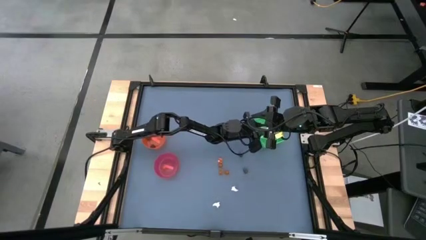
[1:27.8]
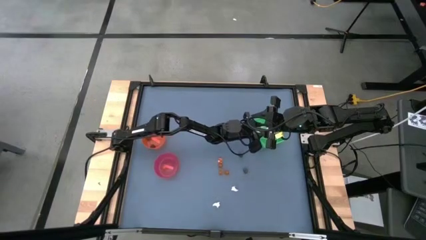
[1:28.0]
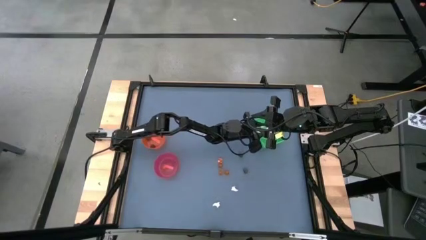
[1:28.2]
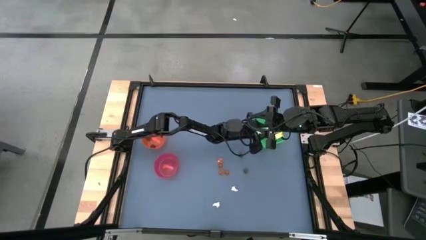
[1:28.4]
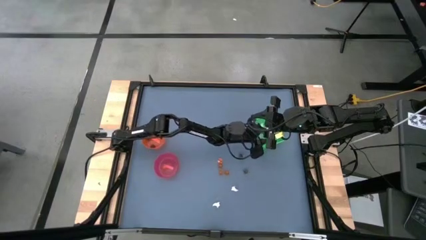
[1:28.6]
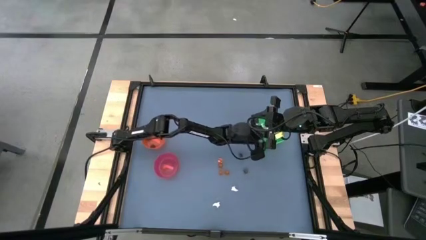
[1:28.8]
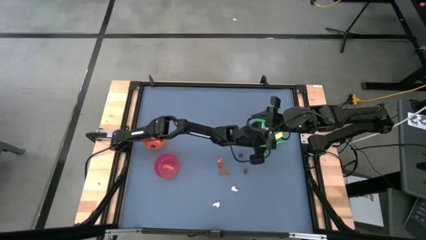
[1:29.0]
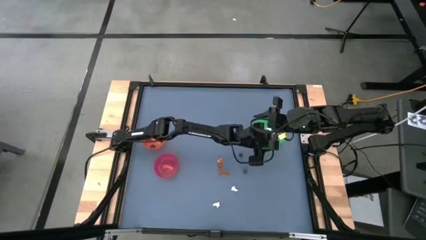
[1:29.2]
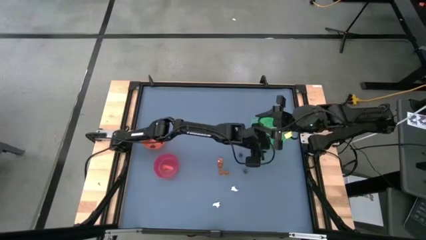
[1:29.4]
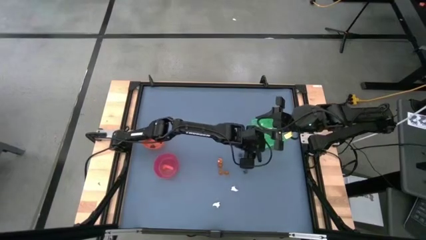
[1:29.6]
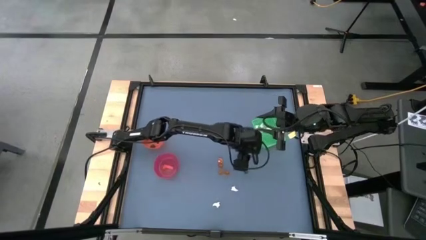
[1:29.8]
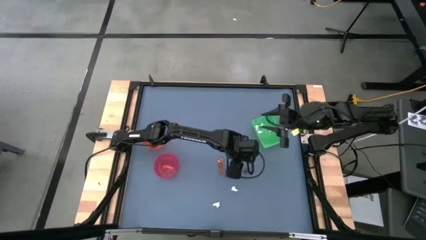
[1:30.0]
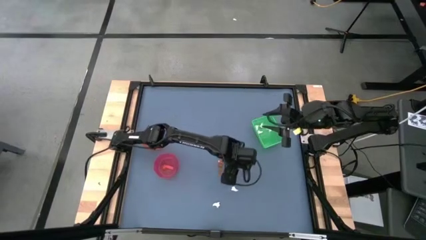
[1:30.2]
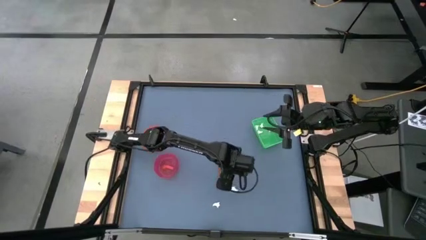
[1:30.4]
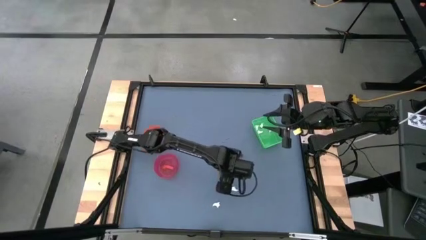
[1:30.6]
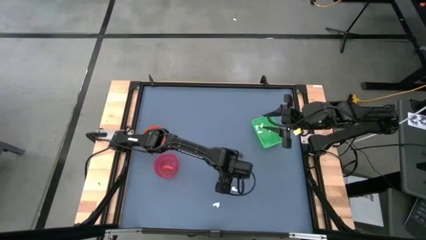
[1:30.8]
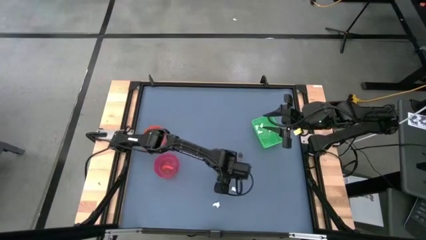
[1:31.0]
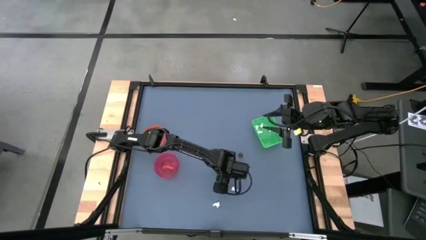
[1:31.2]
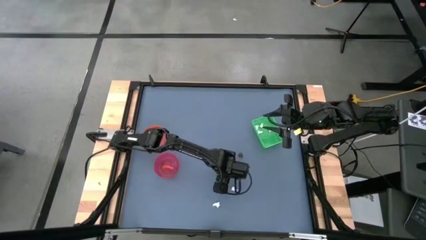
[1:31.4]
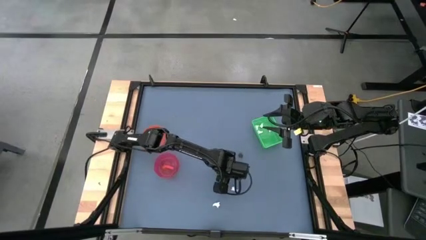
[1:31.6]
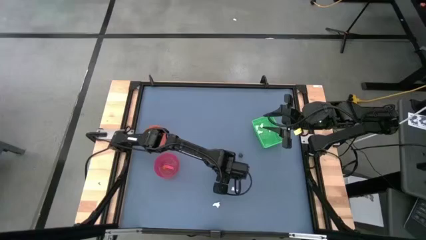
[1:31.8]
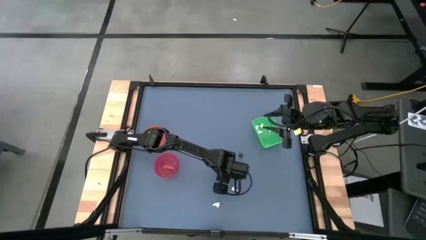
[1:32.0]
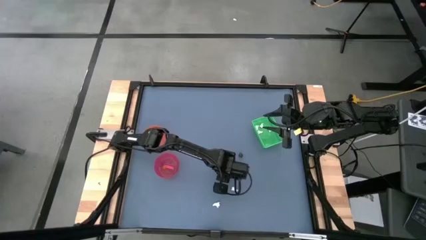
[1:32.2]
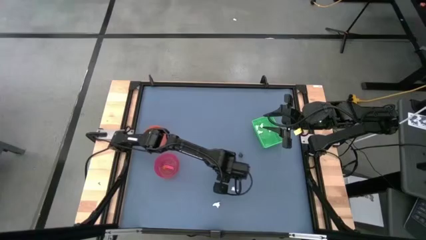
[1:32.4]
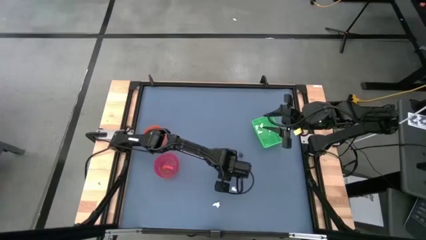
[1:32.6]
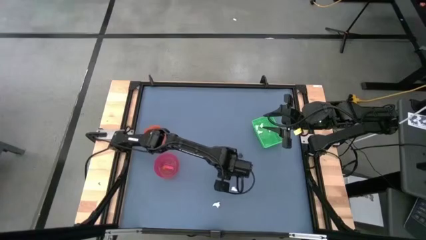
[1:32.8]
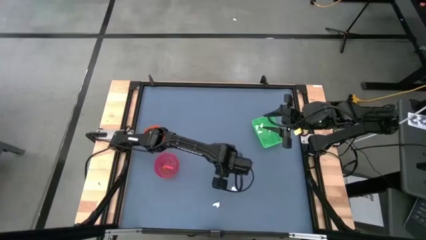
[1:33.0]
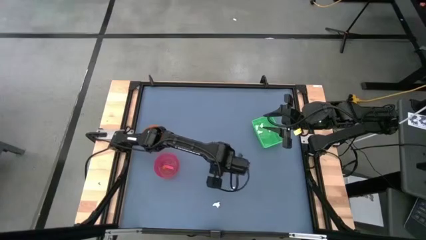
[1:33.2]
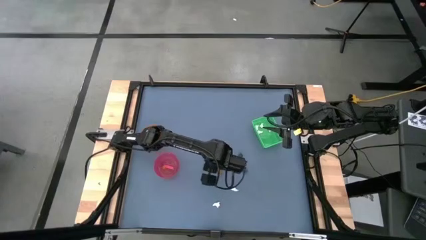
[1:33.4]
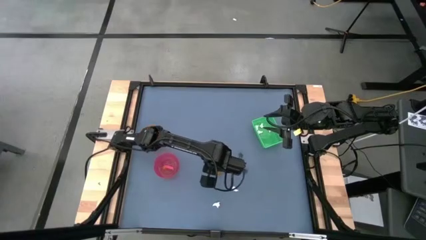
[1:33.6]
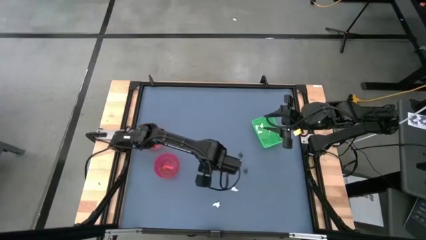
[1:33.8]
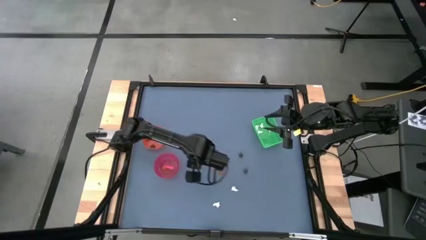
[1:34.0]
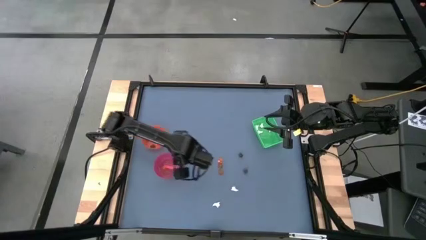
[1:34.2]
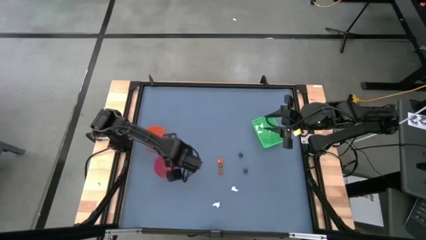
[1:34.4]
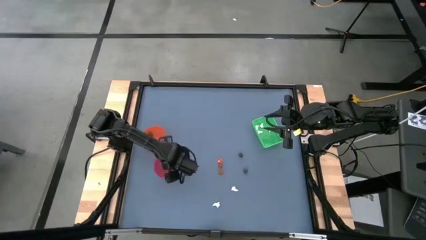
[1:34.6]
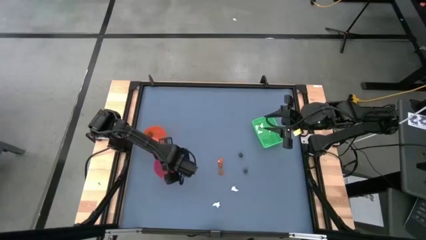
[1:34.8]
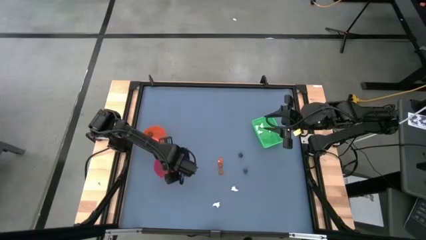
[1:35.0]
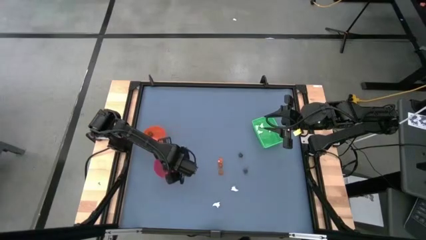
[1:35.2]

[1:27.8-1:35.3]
Task: Sort Halloween decoration
Put the orange pumpkin toy into the red bowl

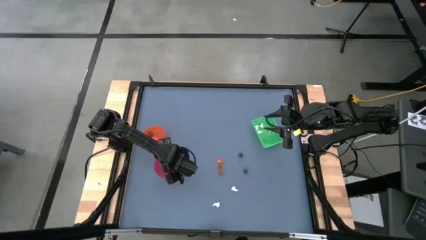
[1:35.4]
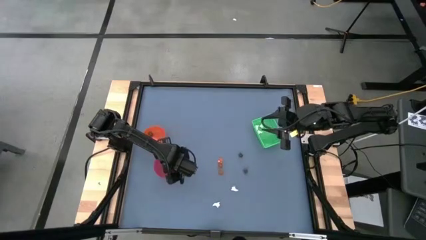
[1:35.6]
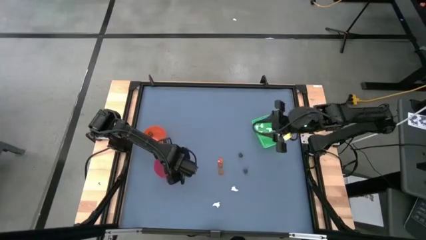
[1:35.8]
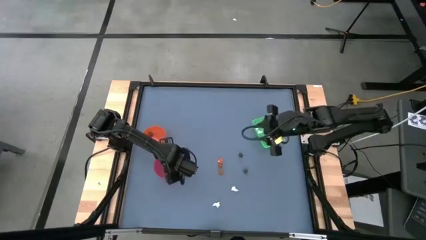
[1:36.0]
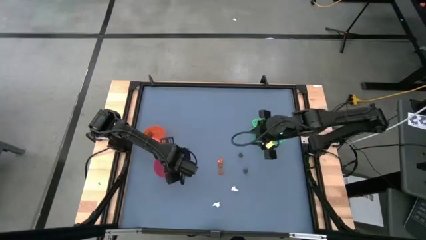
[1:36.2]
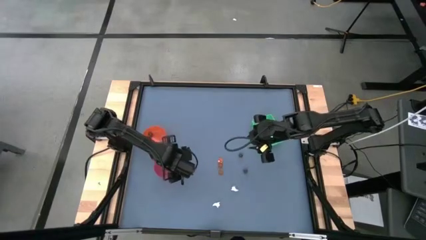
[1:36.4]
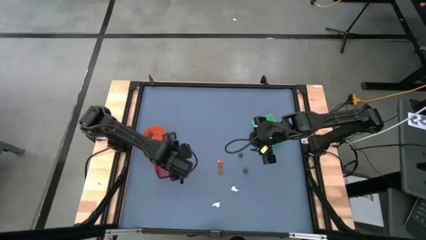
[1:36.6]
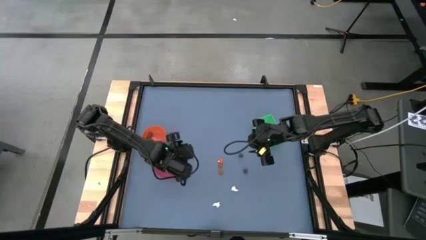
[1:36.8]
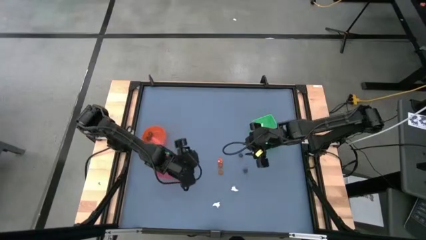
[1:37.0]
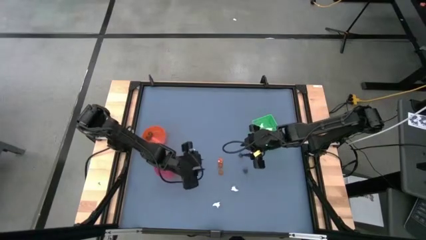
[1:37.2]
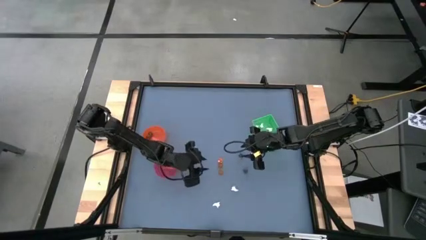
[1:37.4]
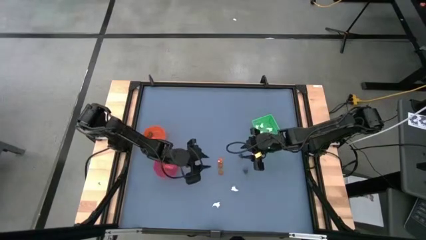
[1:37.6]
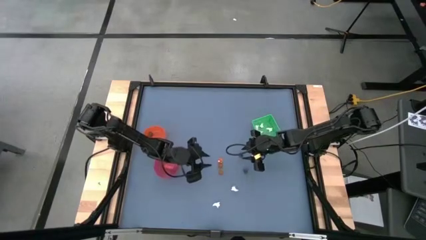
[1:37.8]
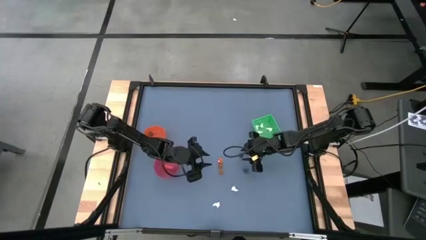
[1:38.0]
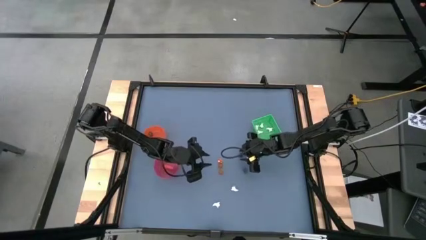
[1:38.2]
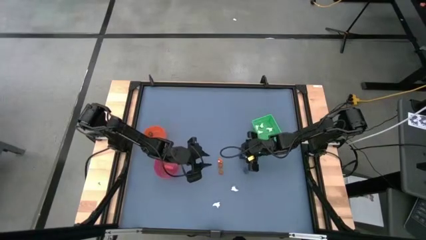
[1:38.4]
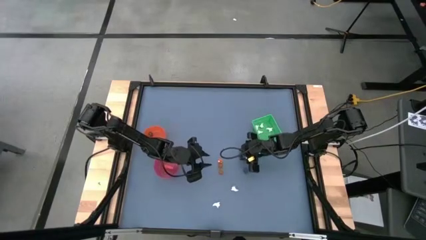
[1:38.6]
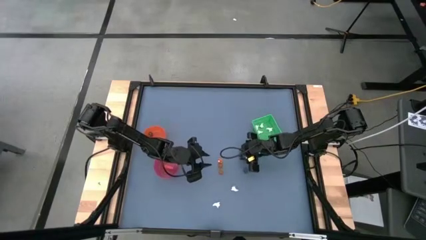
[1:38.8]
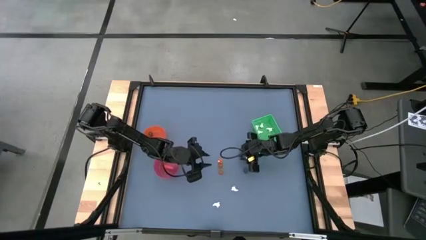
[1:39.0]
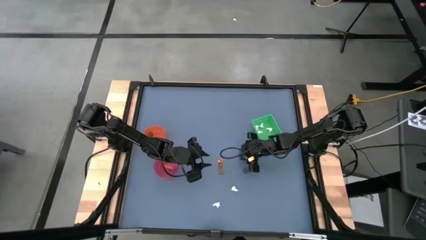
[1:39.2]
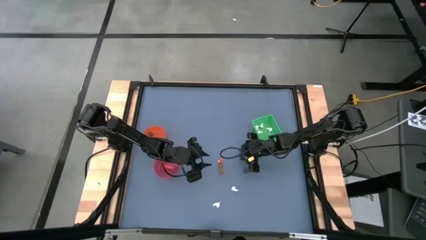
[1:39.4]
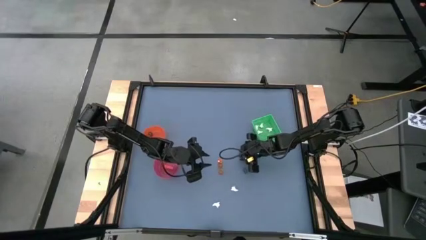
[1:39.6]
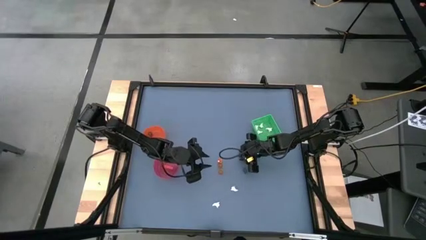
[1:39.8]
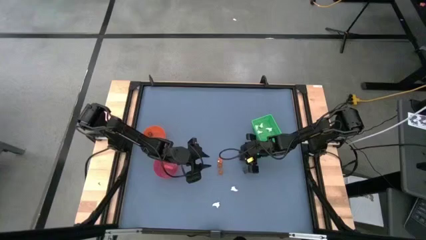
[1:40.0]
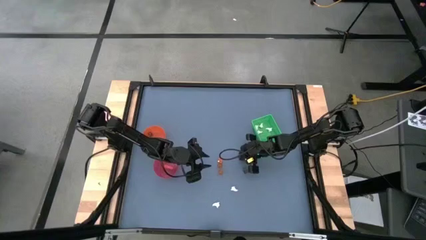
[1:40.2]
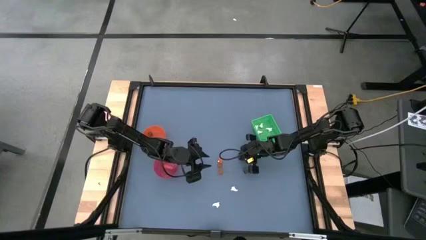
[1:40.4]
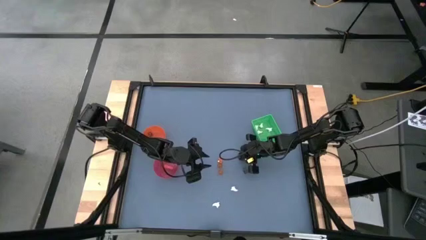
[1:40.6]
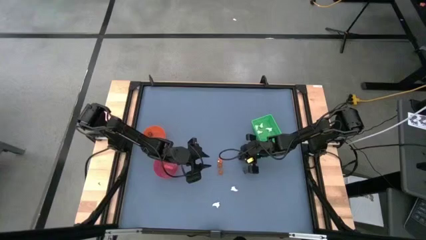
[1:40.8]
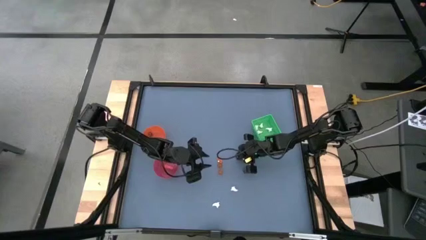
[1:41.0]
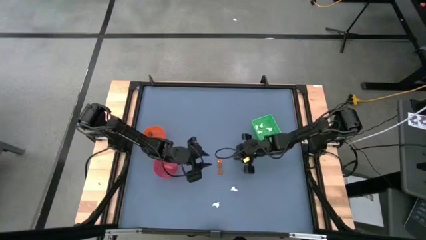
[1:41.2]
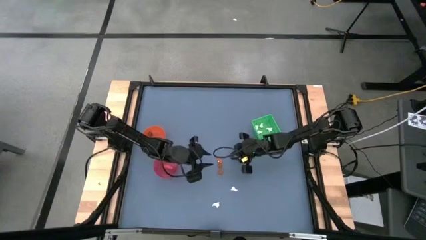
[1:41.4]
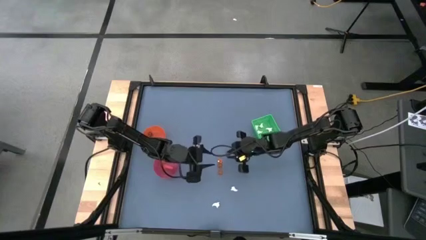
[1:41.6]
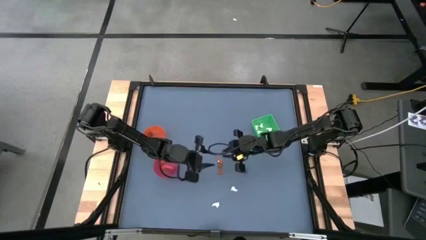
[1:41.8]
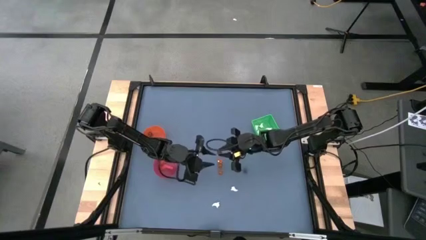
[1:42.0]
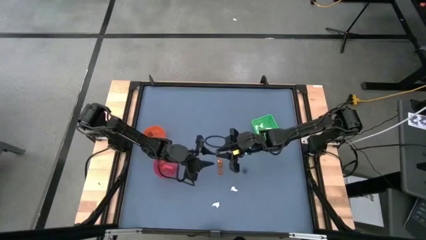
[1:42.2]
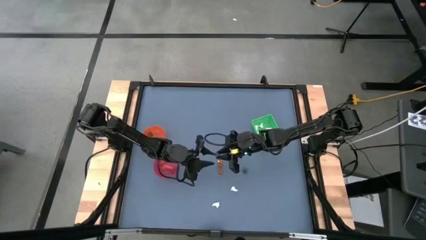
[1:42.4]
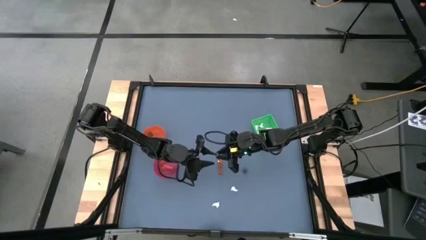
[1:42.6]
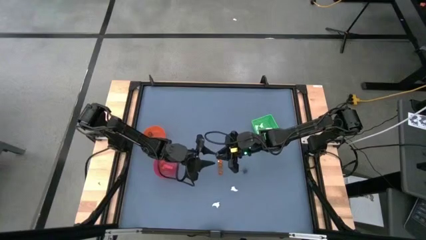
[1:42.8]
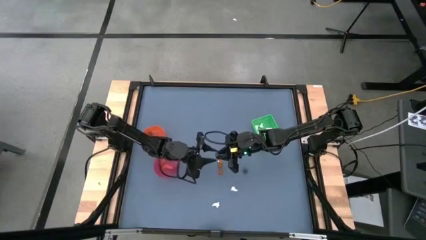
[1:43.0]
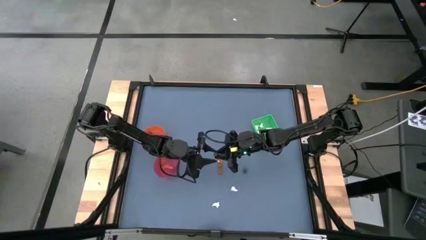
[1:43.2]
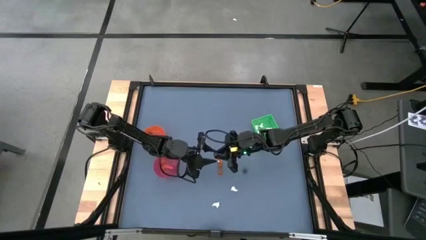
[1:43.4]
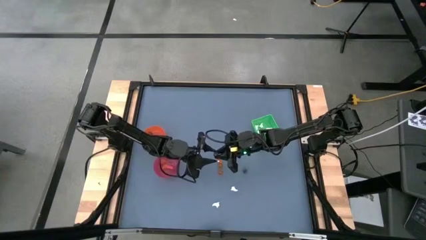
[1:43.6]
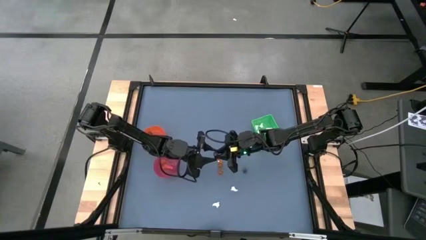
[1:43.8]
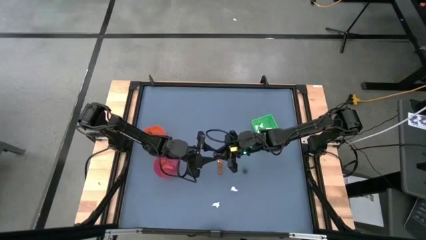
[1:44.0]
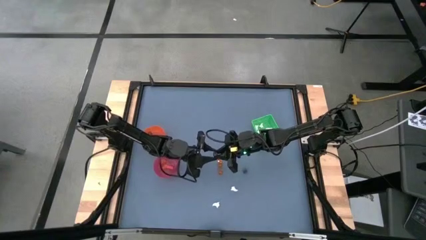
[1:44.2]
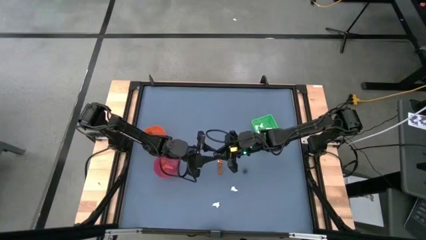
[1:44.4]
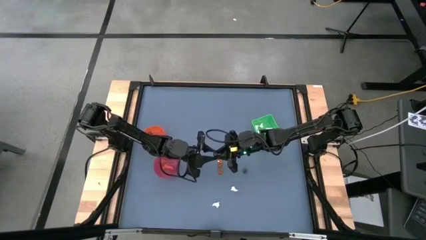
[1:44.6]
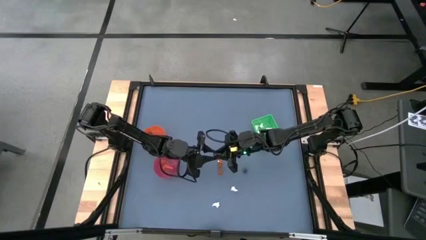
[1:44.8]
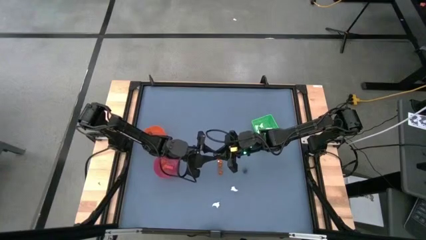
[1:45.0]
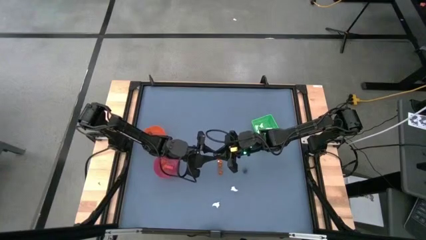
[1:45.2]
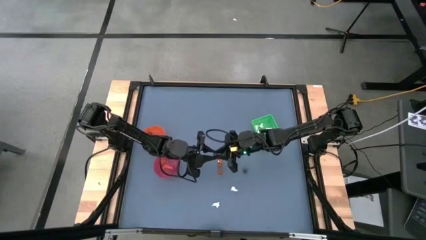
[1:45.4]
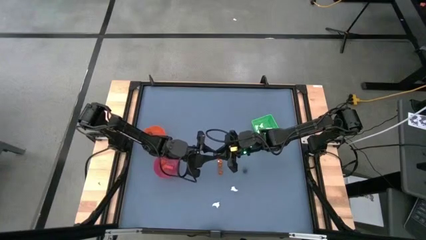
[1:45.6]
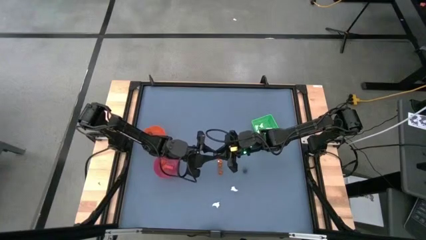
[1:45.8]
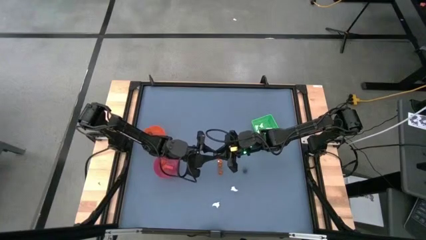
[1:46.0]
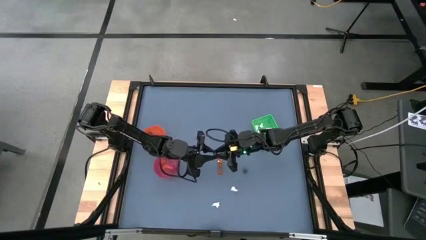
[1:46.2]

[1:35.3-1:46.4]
Put the black skull toy into the orange bowl
